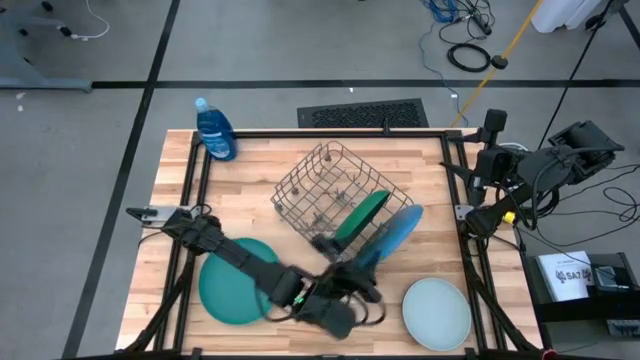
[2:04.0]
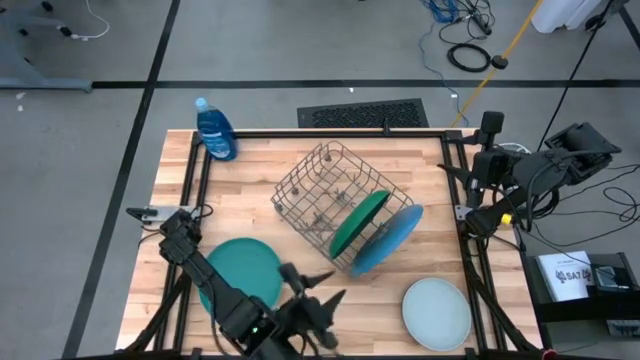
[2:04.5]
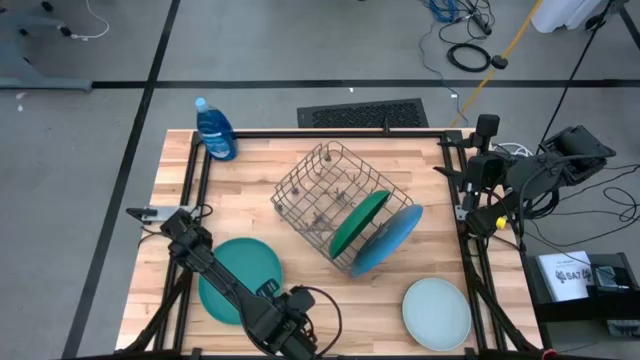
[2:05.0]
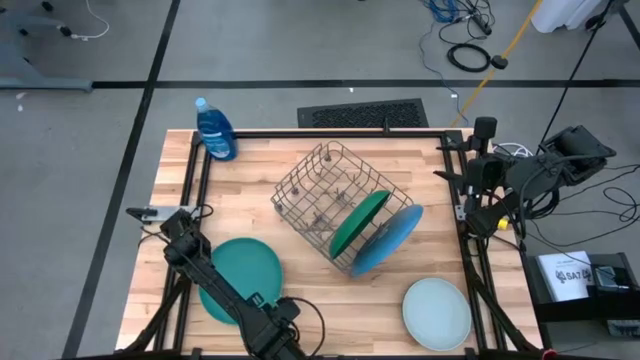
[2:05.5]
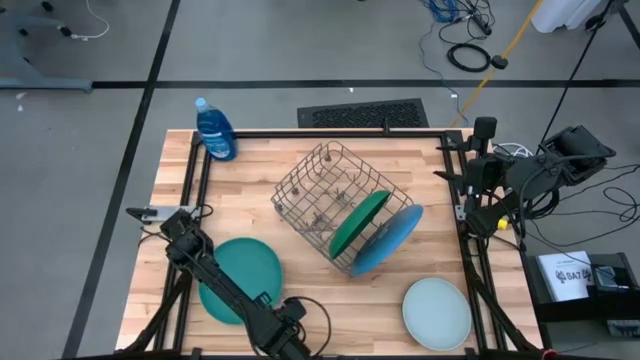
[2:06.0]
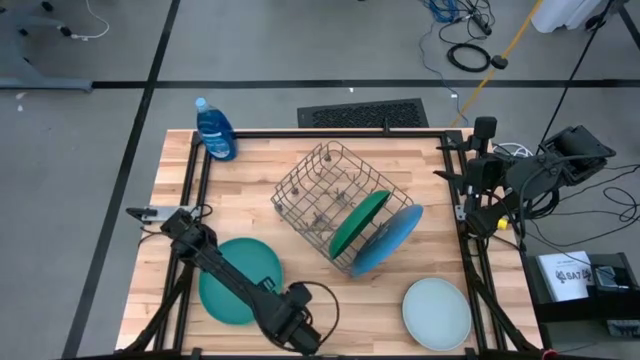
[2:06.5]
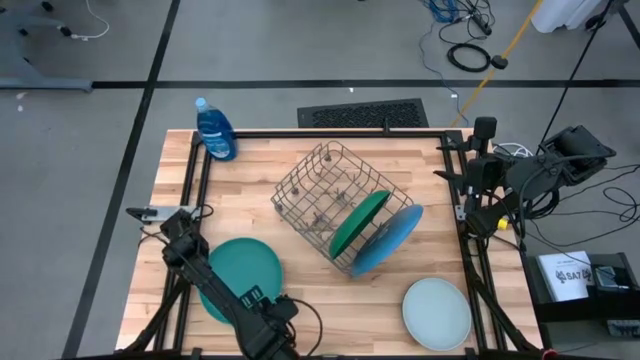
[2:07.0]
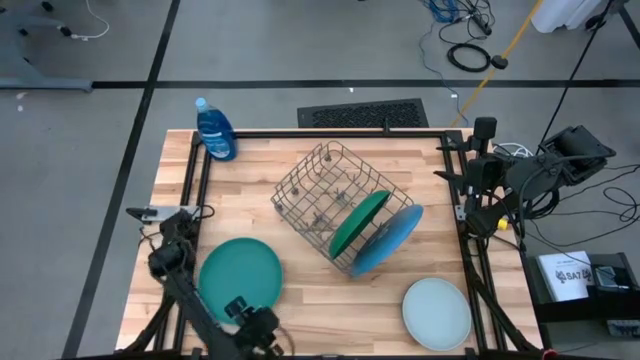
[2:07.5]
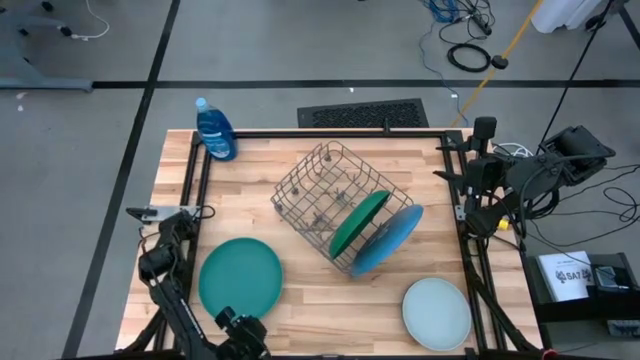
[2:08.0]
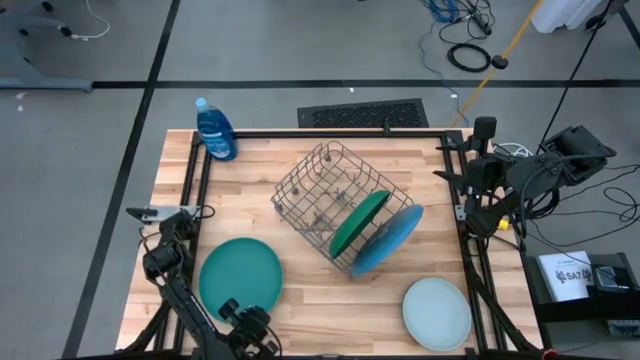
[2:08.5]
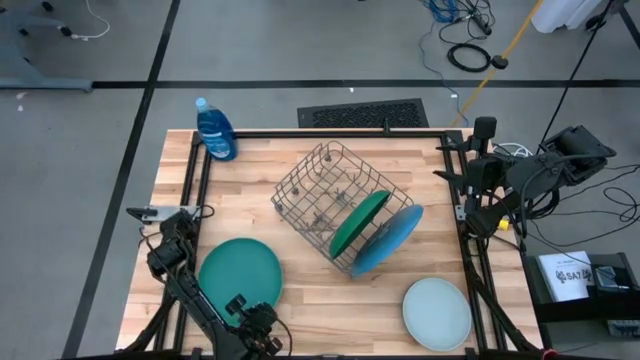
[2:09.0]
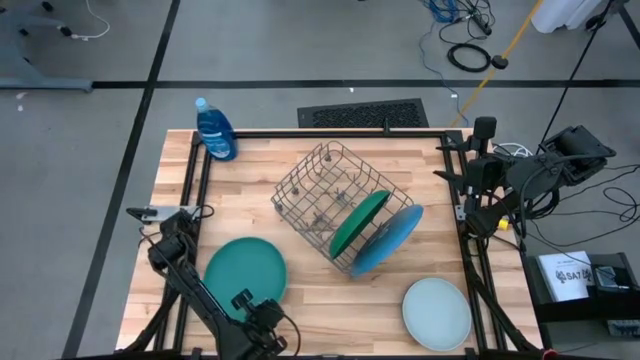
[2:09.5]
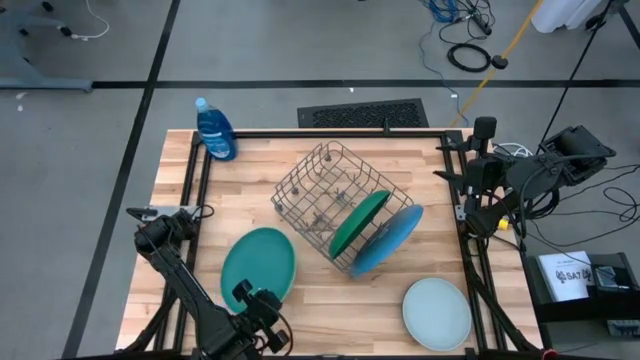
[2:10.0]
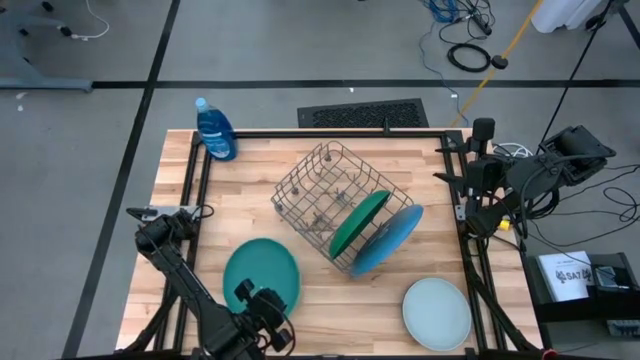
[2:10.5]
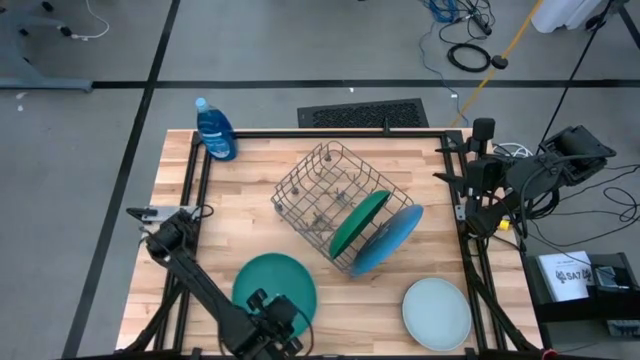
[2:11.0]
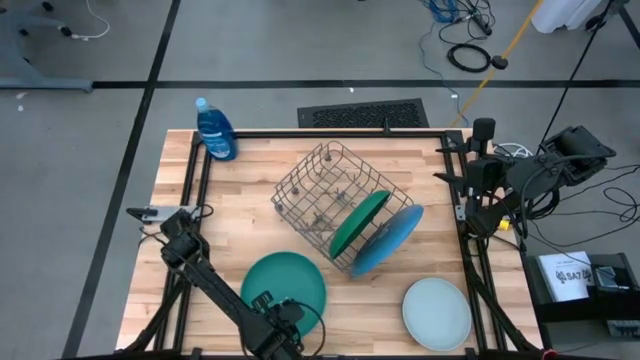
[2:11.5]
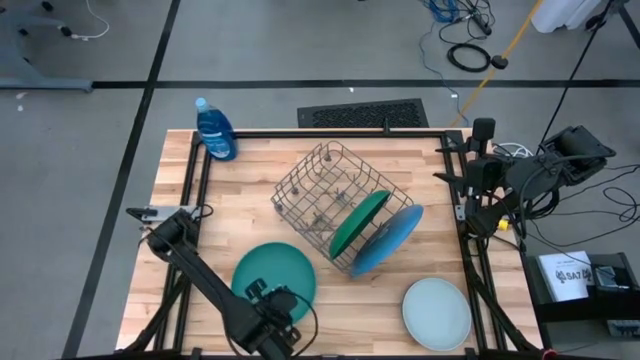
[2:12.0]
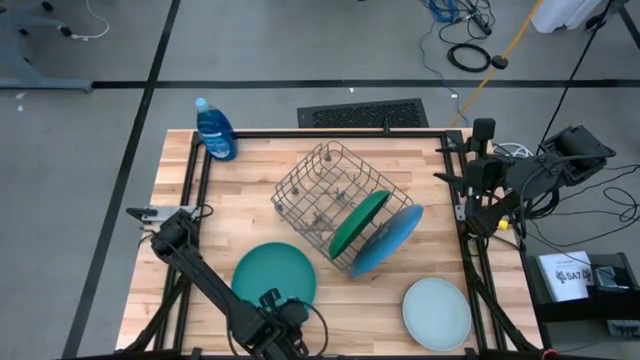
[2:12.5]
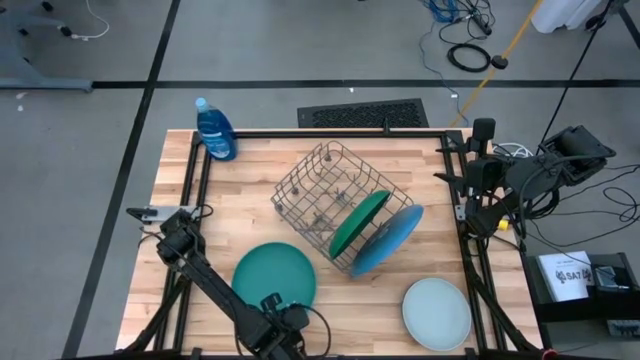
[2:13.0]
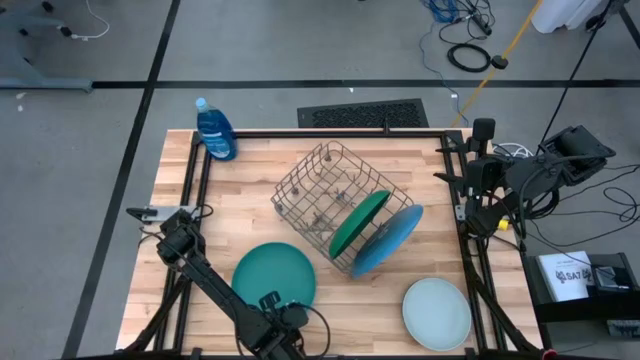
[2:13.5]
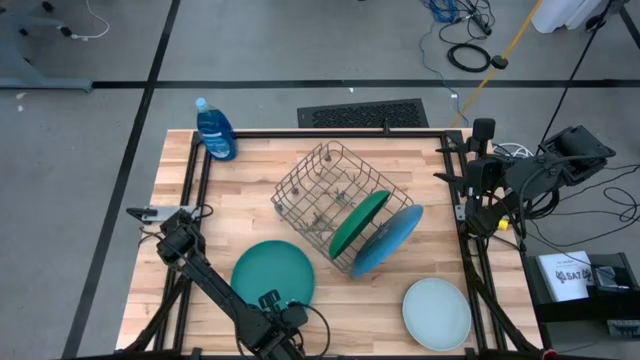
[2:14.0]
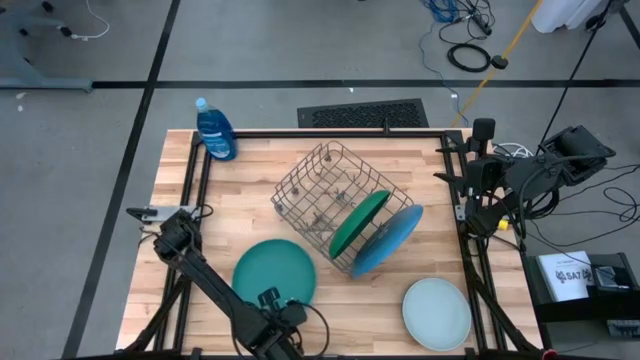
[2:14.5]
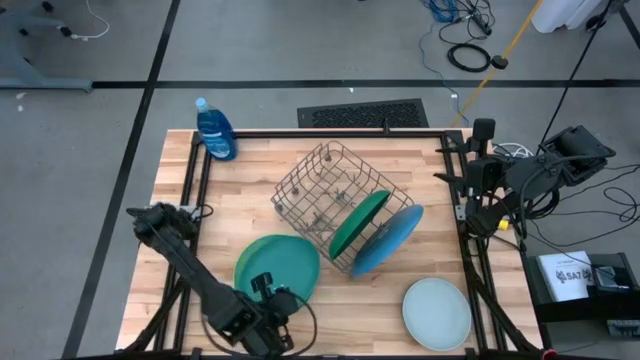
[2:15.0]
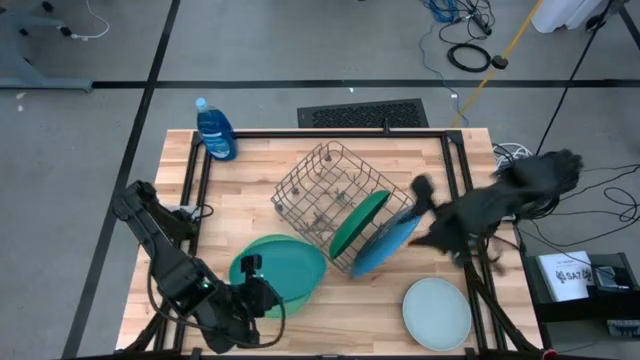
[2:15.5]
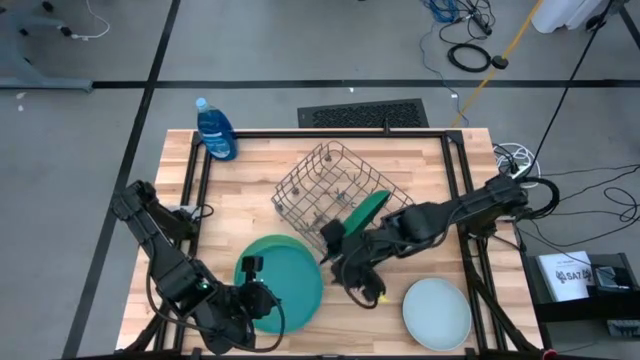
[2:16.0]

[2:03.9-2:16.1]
Task: Sort dishes
Put the green plate into the dish rack

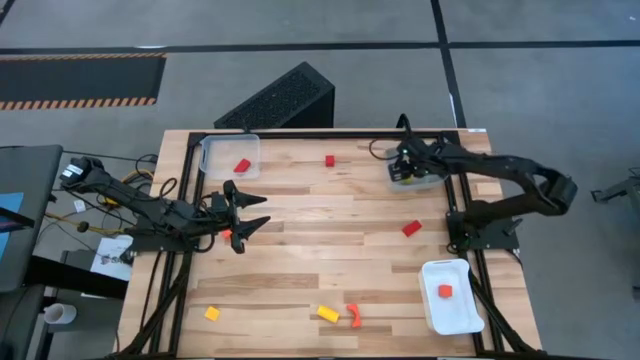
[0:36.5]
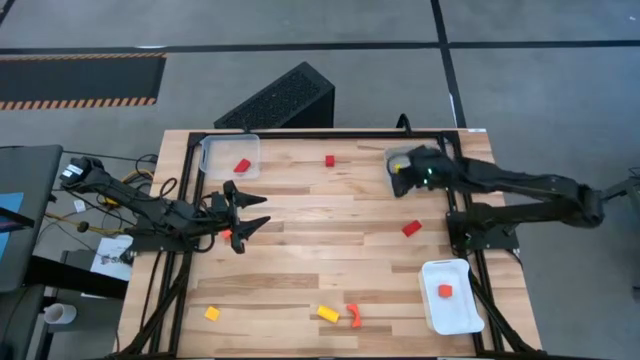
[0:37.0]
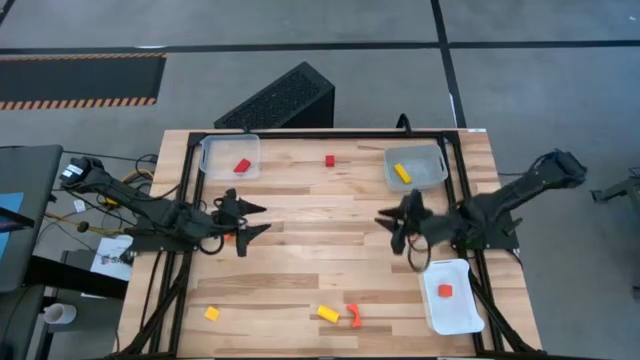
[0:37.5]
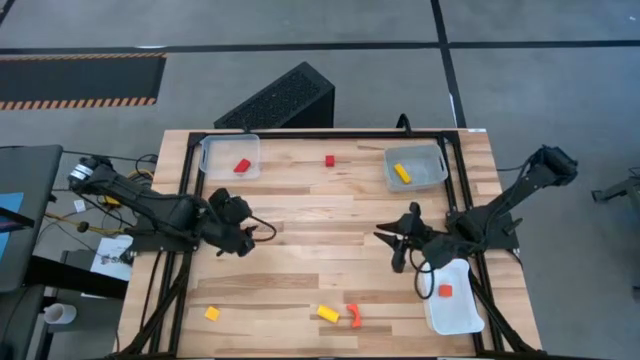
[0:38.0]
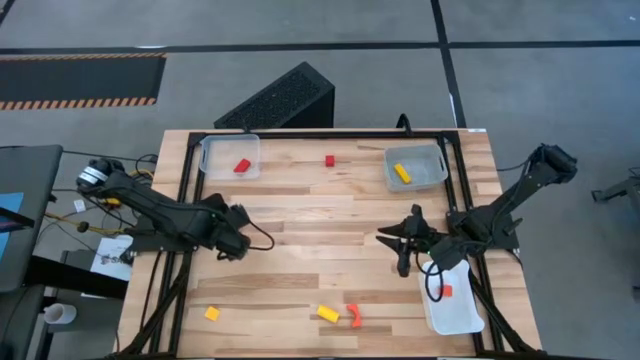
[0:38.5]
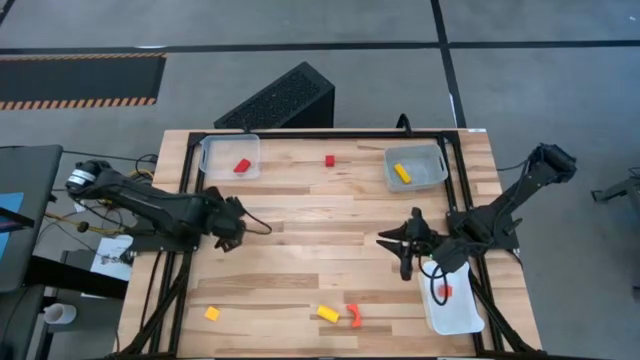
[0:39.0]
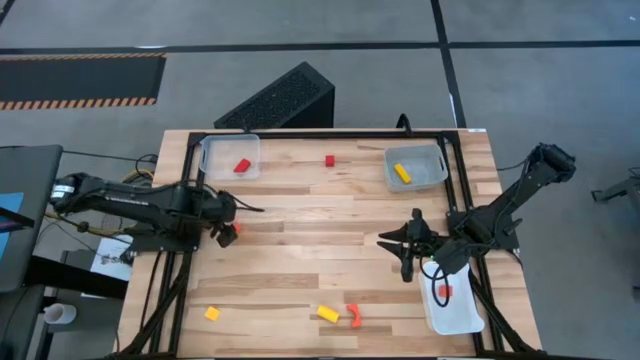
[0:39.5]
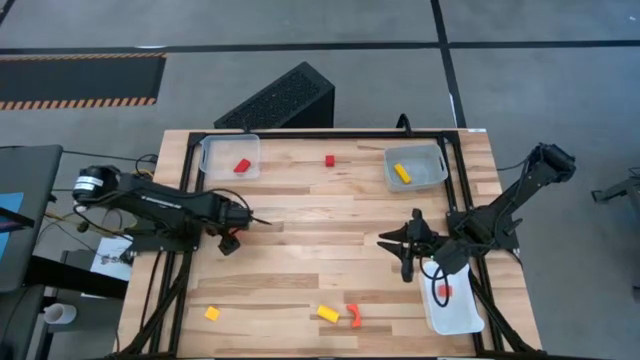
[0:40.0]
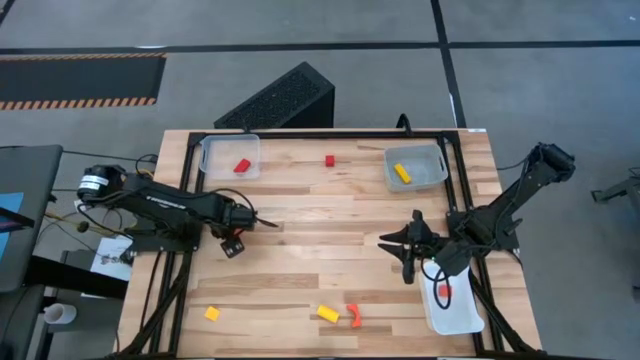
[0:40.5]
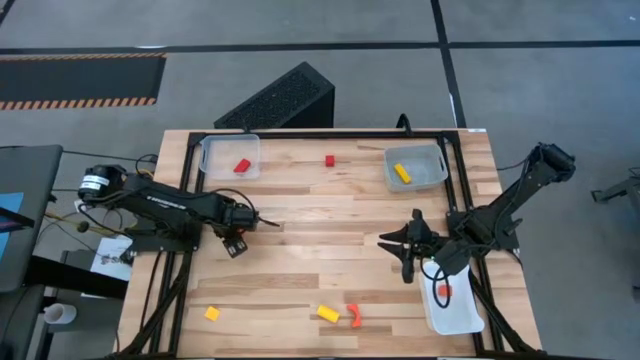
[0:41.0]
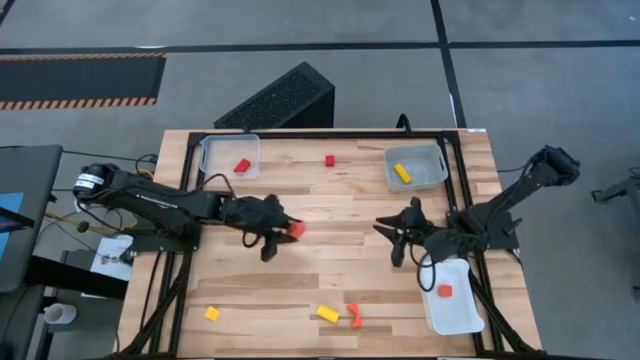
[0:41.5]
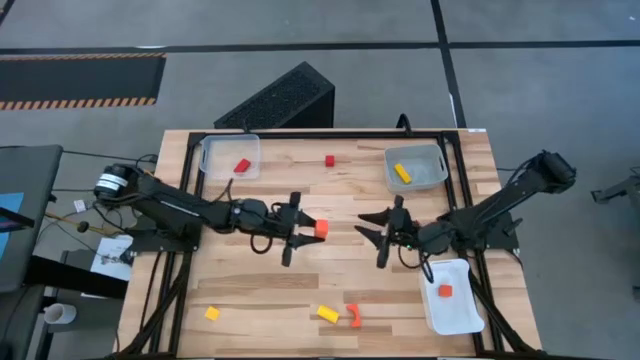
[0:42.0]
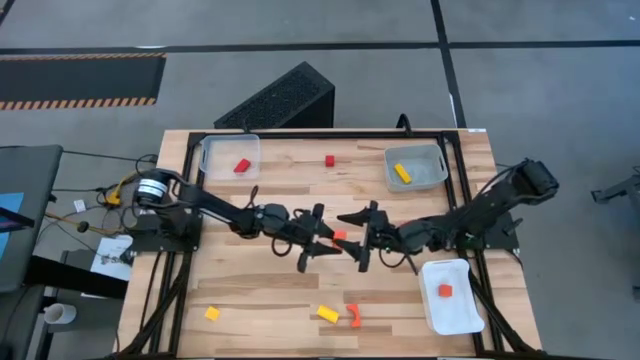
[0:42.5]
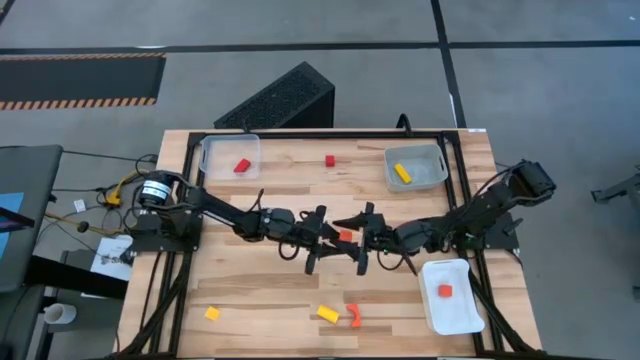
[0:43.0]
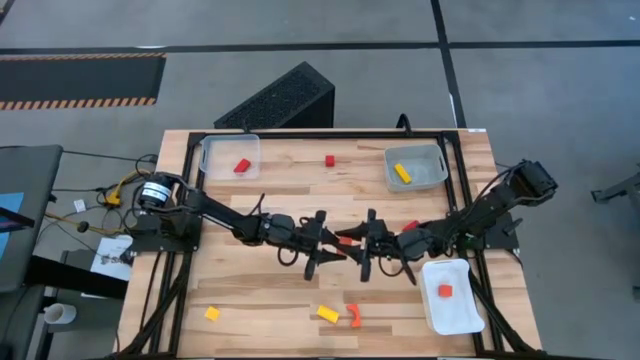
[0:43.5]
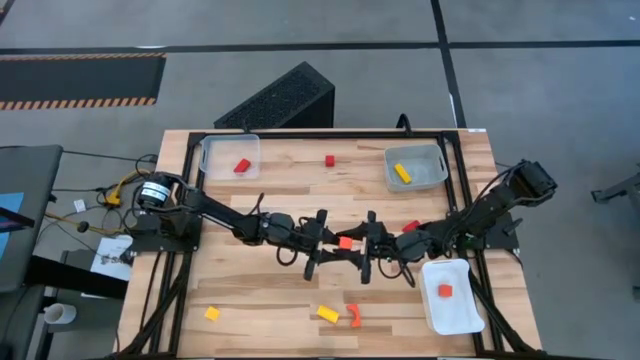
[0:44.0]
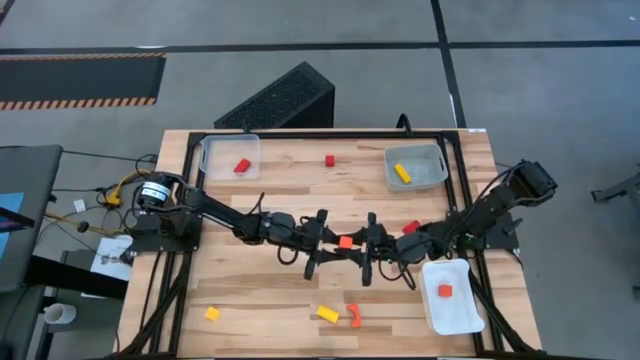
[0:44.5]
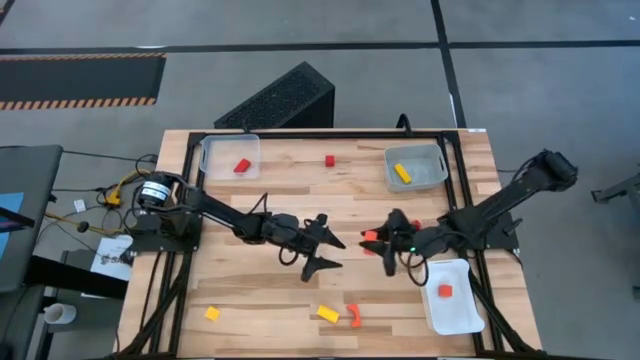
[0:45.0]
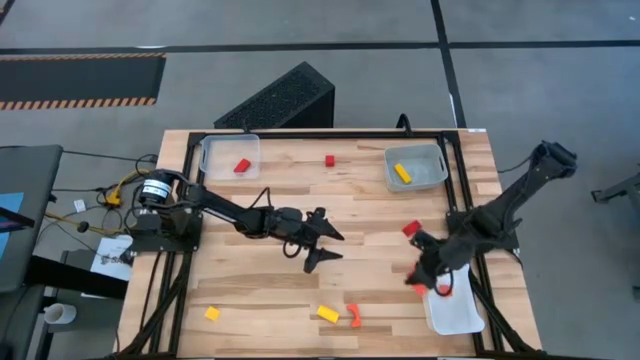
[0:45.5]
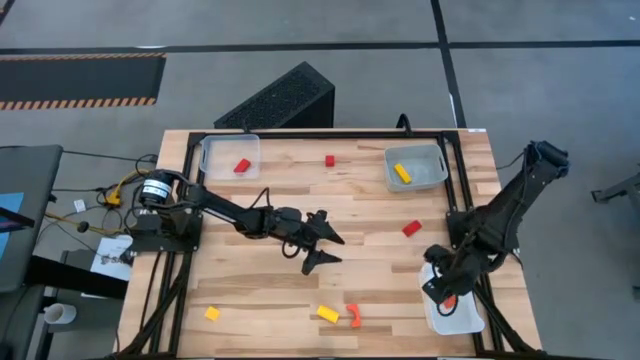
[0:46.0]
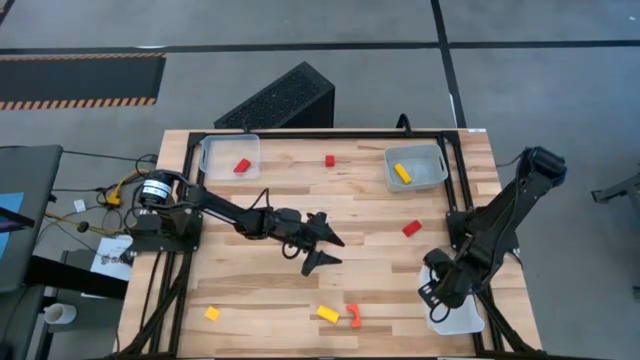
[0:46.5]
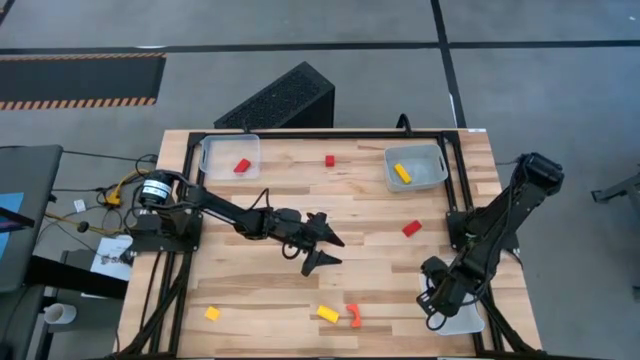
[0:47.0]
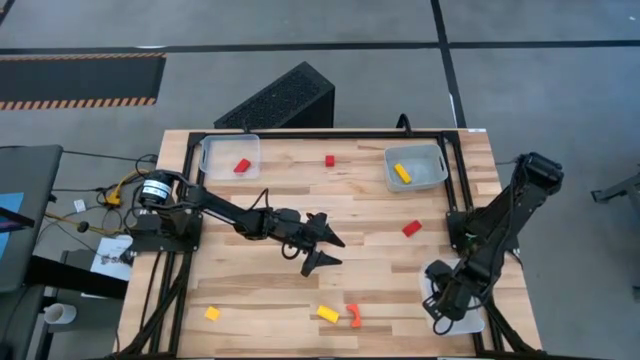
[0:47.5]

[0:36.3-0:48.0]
Task: Sort & place blocks by color
Put the top orange block into the white bin
